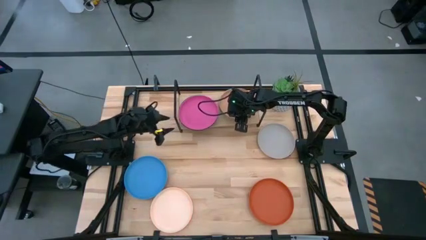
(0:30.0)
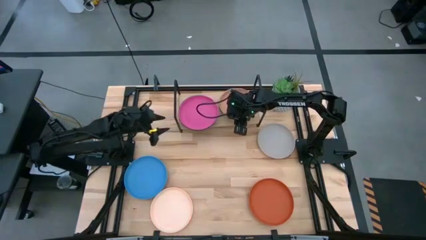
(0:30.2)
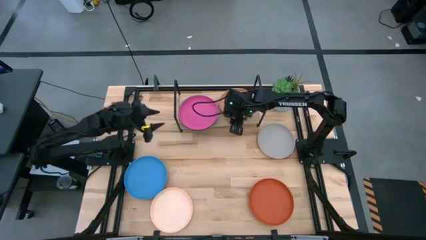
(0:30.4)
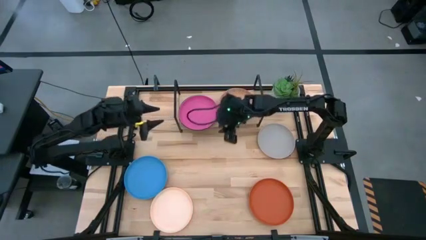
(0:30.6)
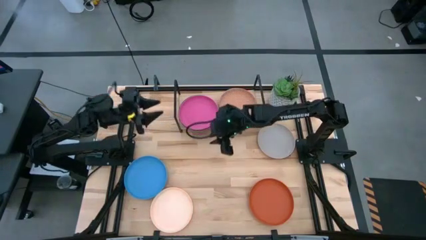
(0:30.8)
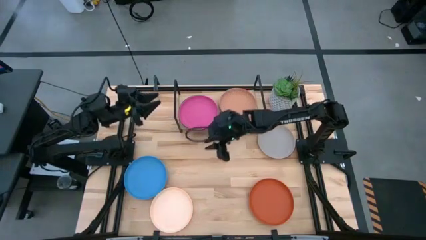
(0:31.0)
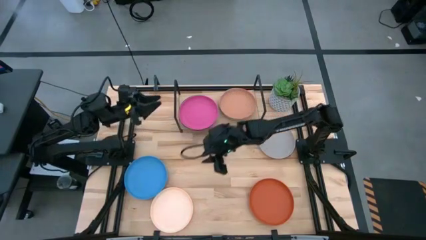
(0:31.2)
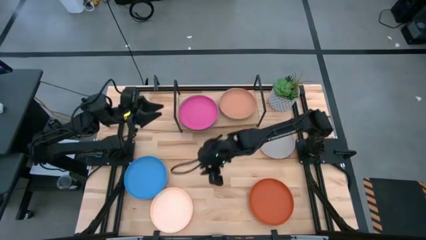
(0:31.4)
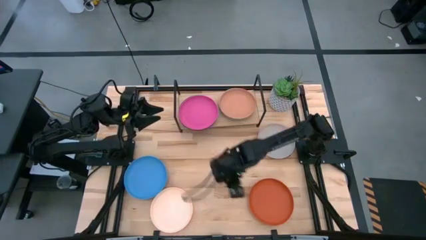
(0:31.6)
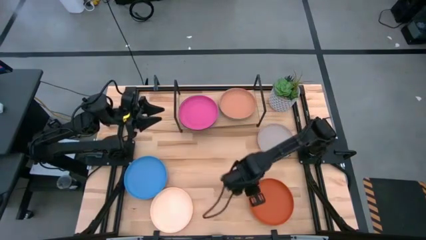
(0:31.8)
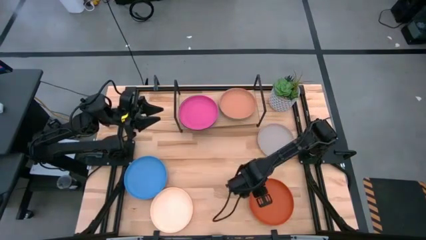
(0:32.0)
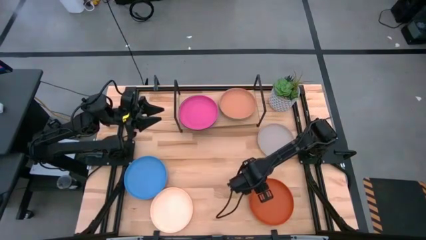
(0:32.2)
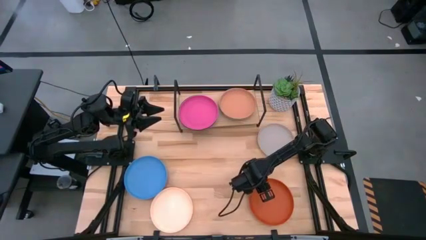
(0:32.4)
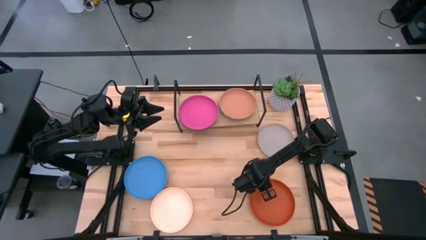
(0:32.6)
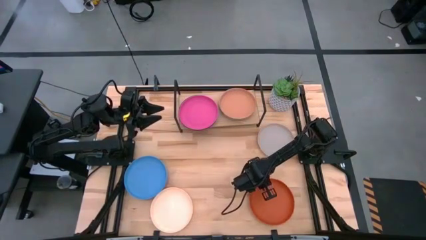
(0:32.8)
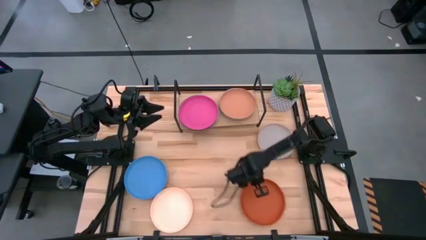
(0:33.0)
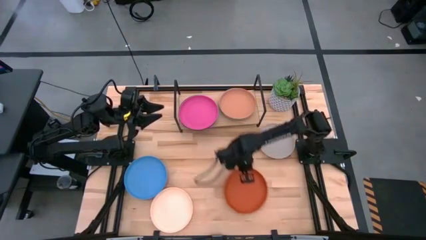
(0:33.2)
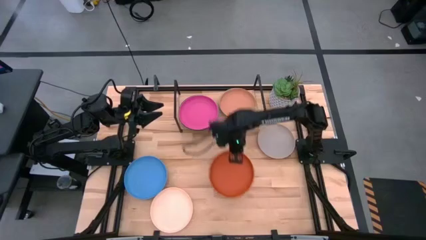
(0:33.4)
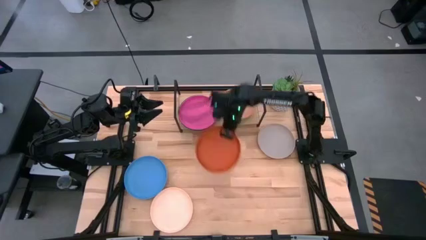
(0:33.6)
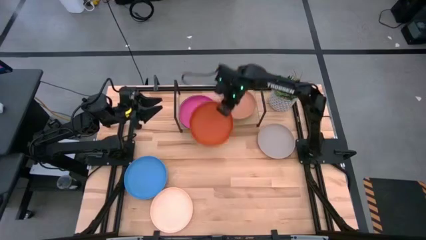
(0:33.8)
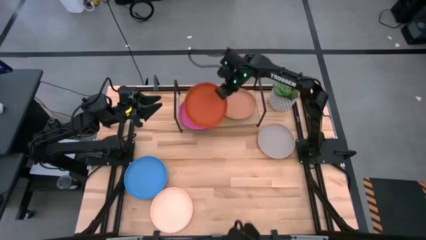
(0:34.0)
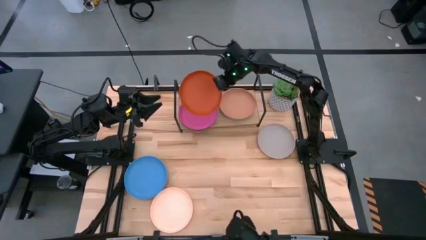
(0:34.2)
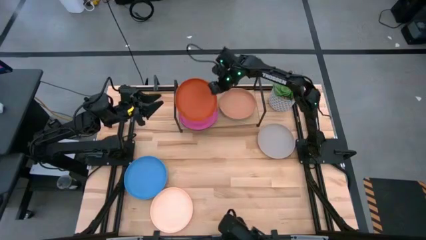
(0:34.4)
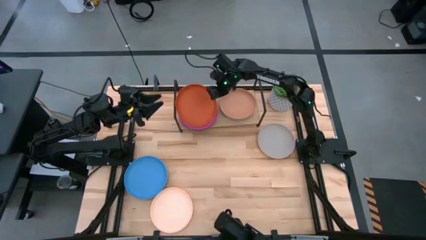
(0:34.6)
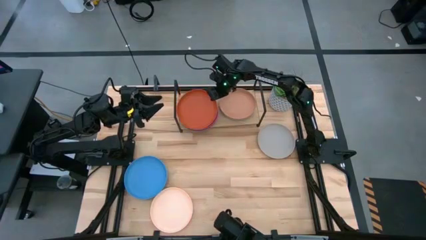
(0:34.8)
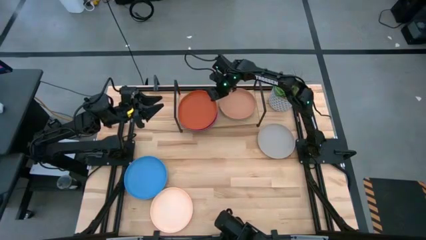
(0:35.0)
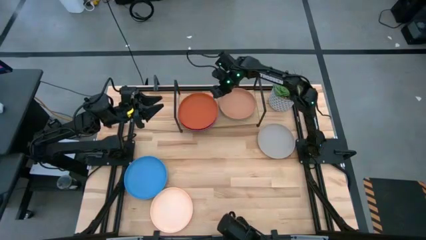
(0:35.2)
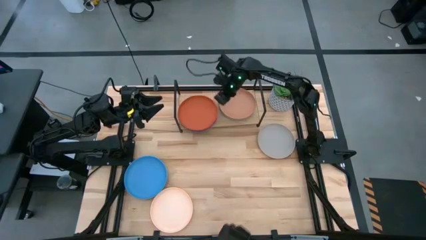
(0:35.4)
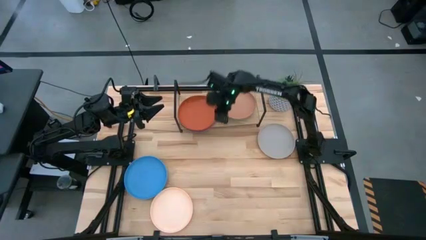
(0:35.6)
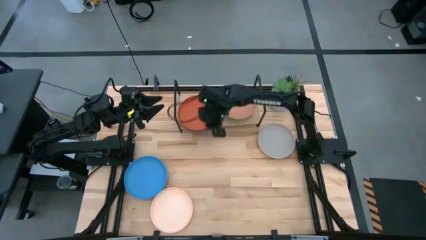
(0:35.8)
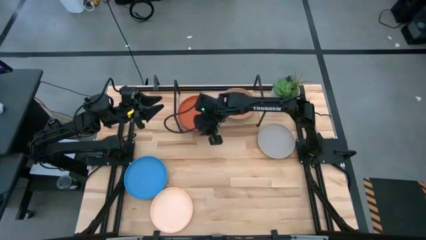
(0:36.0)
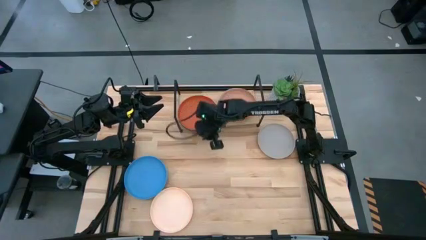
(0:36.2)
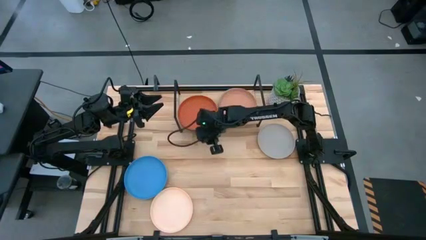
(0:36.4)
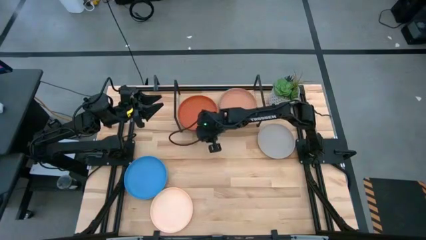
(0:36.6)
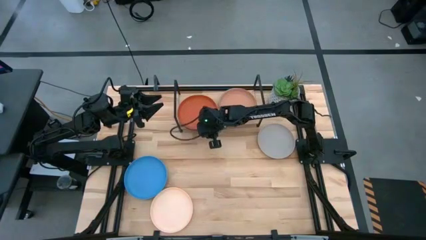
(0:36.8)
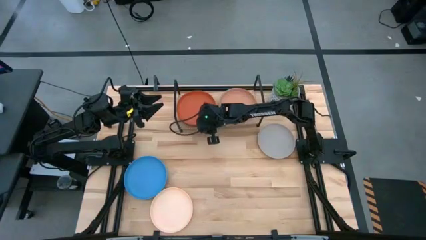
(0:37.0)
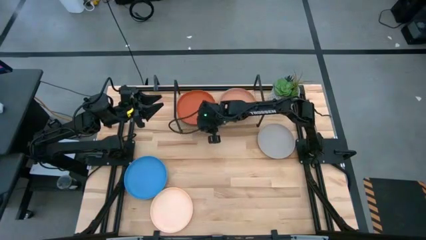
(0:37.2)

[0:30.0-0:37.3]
Task: Place and stack plates onto a shelf
Stack the orange plate on top of the pink plate on the shelf

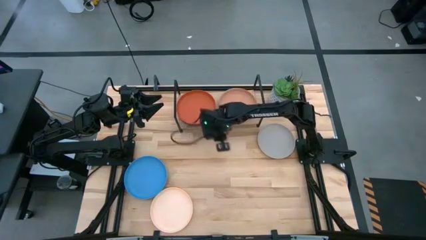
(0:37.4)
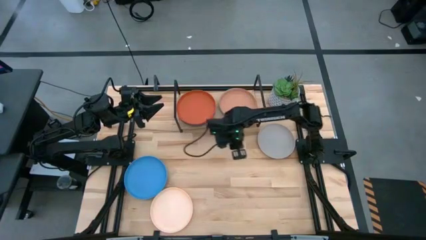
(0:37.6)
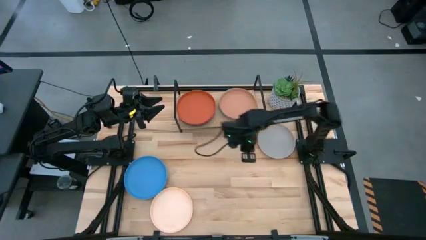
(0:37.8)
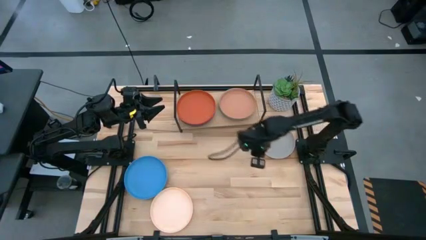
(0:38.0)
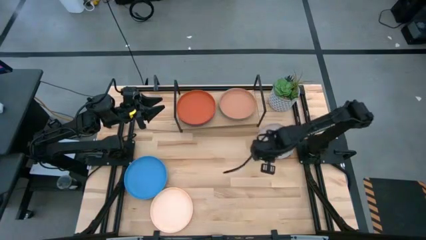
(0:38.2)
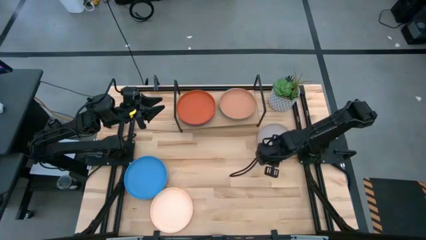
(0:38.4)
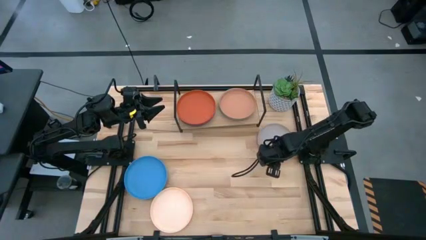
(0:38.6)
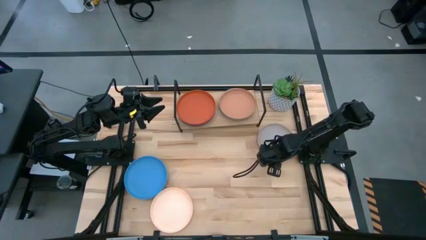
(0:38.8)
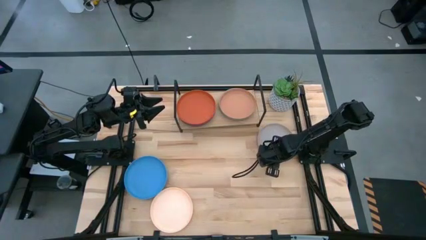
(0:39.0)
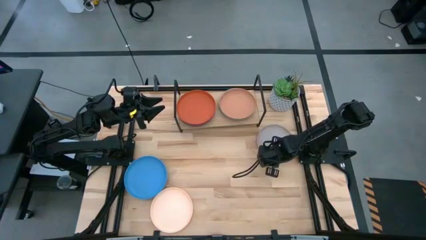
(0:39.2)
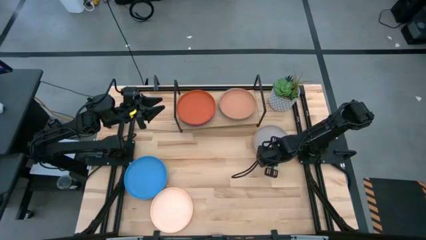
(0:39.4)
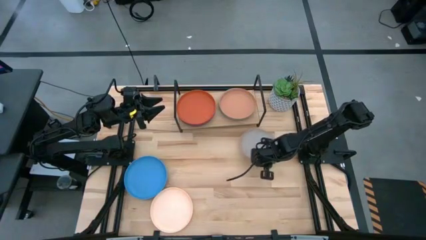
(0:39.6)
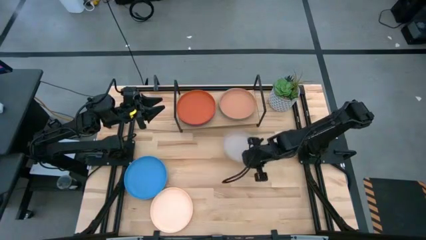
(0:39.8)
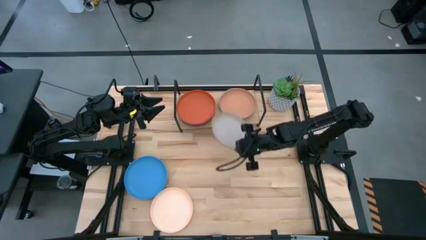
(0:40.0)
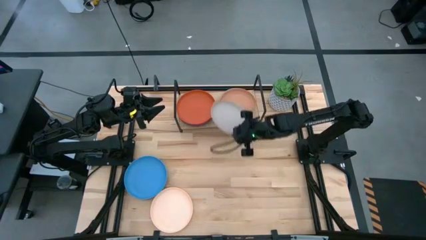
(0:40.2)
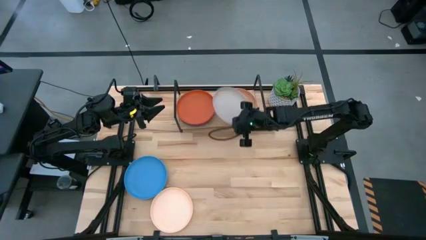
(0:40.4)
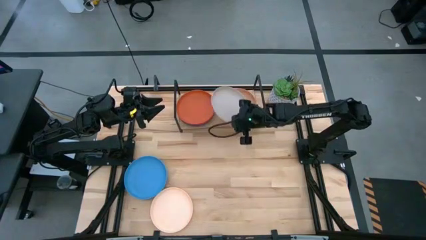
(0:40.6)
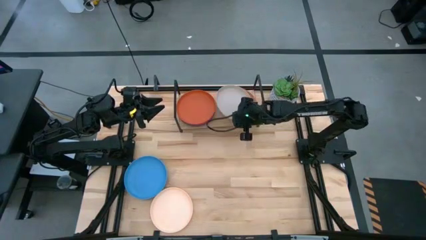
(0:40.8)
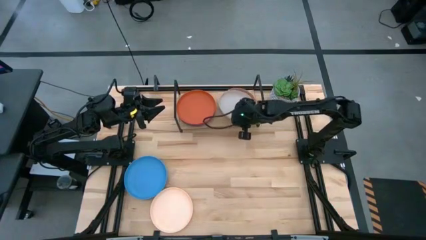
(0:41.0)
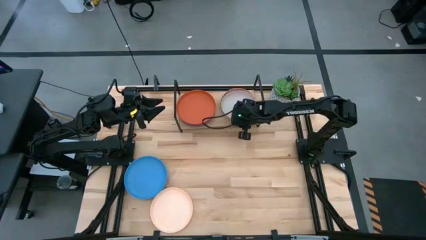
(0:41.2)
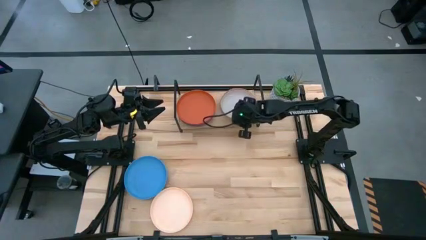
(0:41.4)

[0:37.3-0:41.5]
Stack the gray plate on top of the brown plate on the shelf

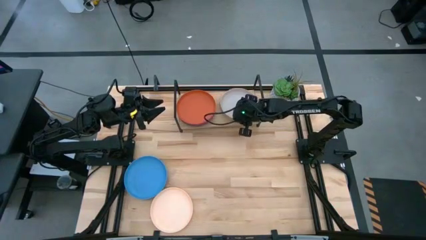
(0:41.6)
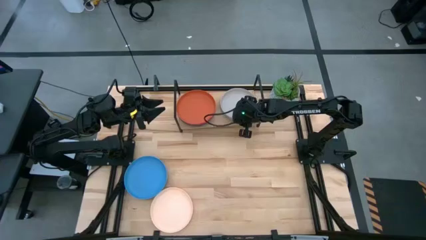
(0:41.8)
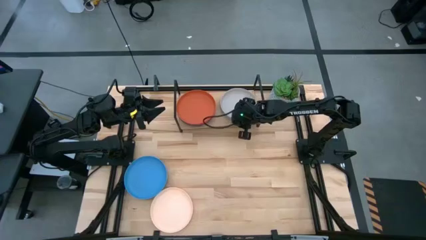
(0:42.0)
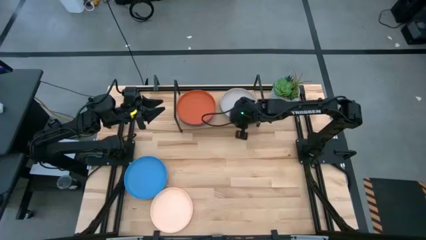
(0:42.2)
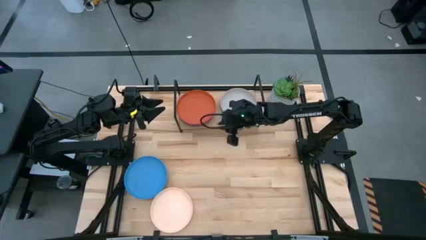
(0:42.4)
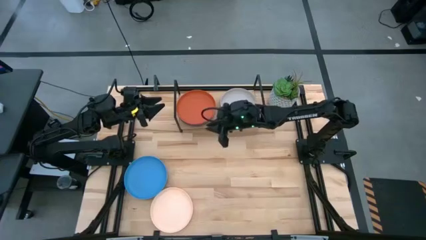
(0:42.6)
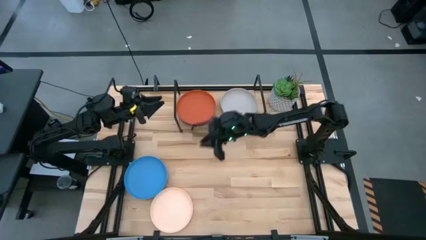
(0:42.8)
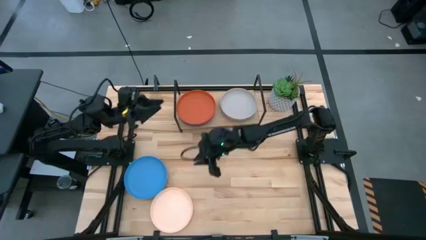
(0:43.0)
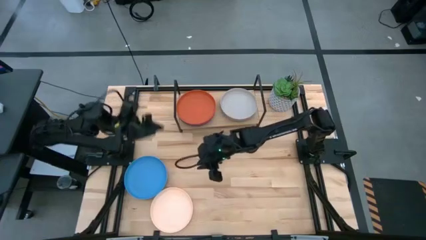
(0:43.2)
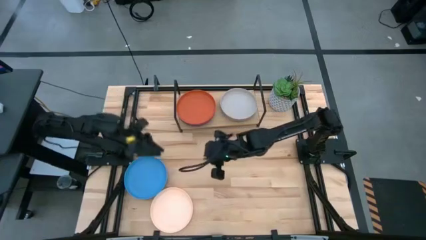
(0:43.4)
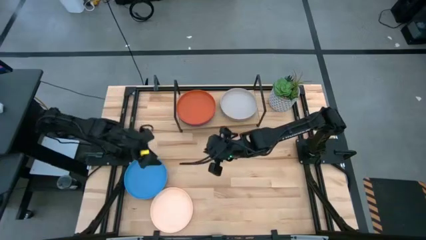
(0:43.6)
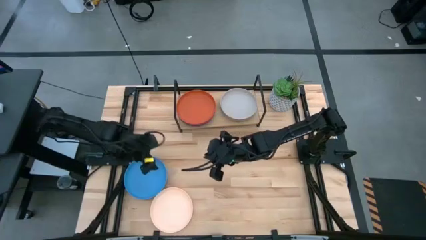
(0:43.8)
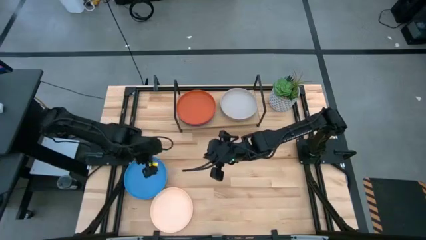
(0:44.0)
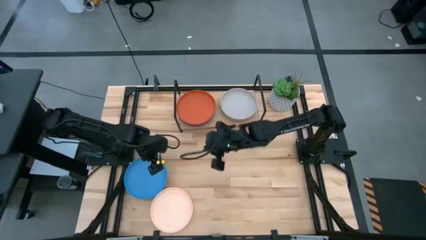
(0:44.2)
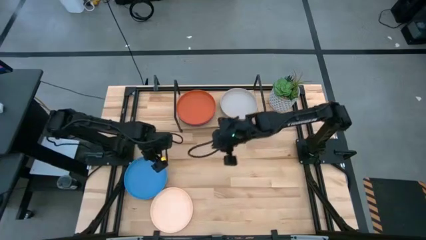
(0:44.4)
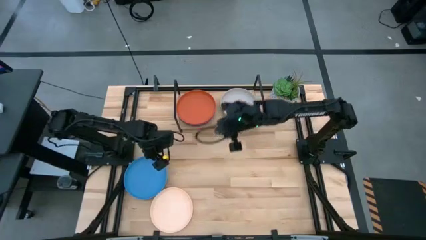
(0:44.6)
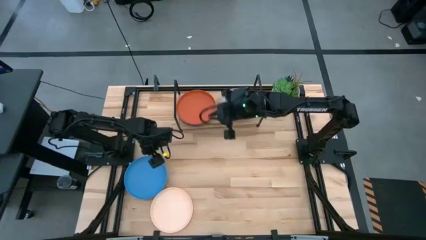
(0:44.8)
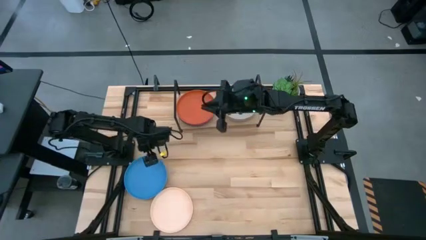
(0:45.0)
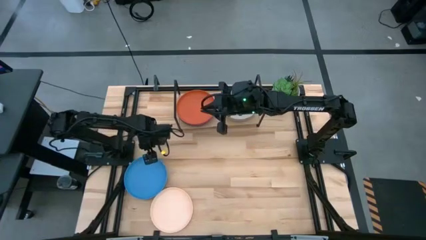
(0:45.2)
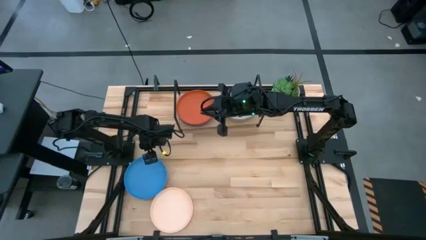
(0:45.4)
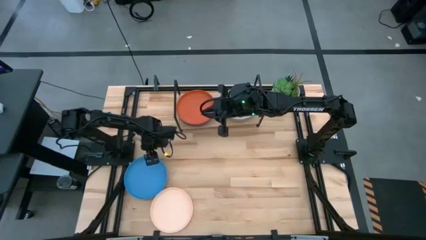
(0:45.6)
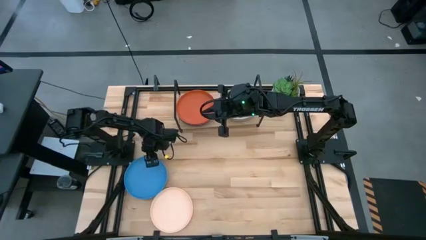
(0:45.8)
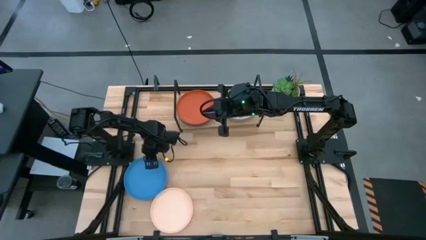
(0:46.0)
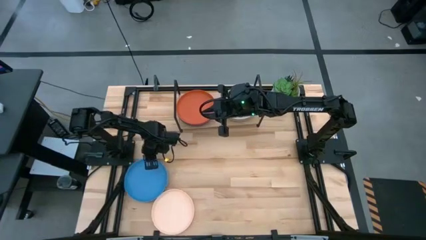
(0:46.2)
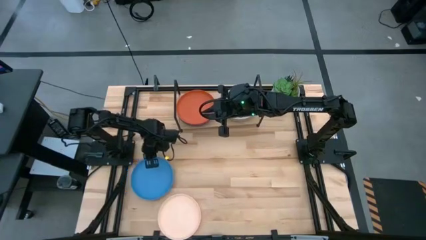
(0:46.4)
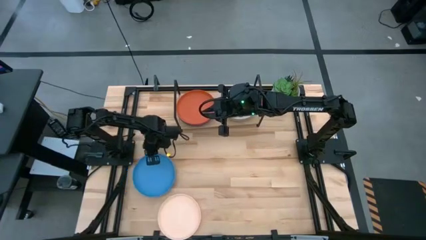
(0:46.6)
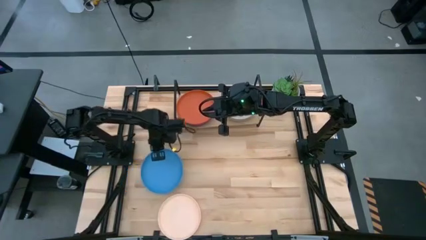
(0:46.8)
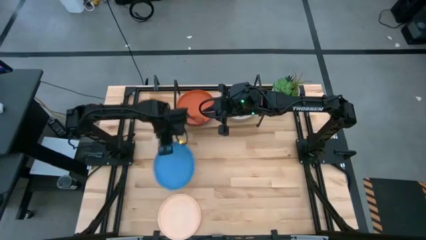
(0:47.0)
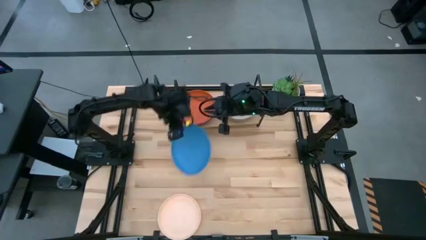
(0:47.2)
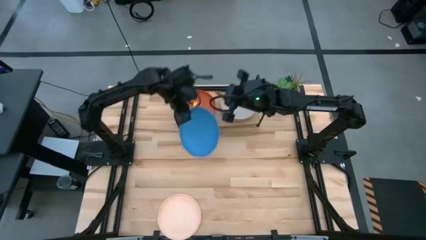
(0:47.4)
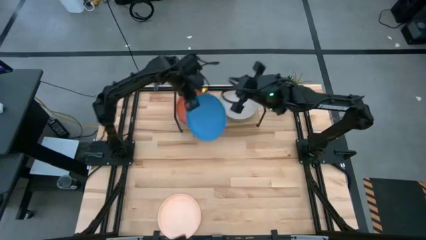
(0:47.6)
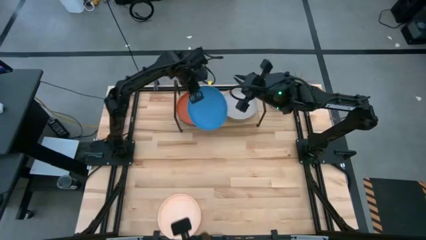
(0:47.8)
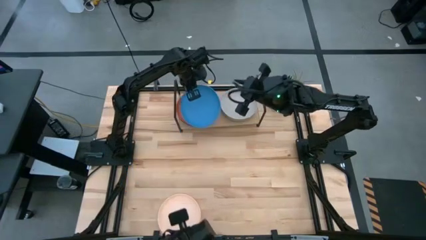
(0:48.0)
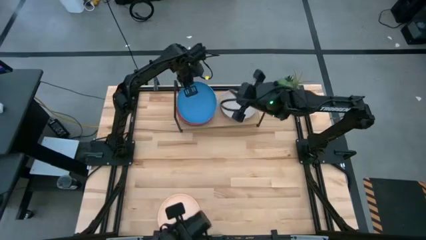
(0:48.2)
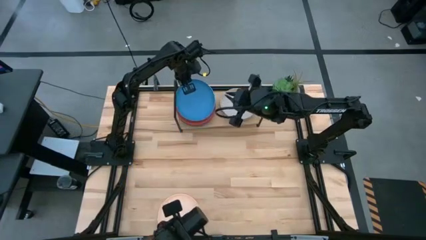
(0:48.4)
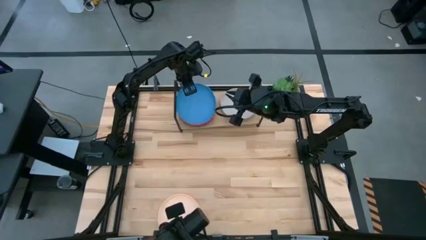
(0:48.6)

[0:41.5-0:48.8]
Stack the blue plate on top of the orange plate on the shelf
